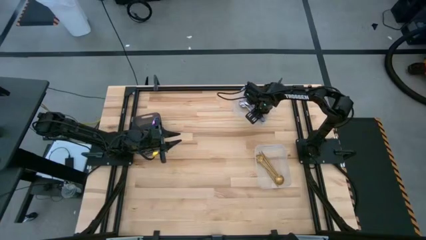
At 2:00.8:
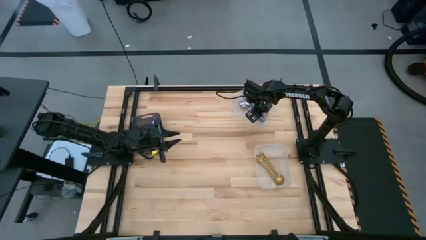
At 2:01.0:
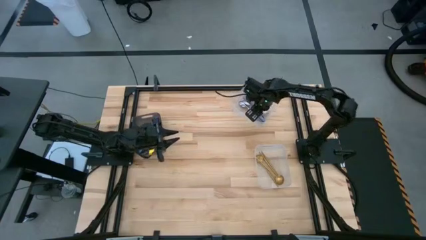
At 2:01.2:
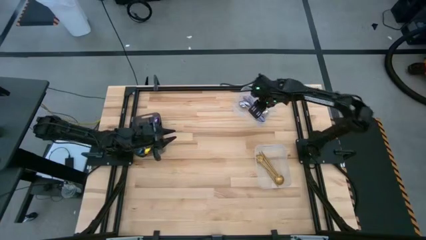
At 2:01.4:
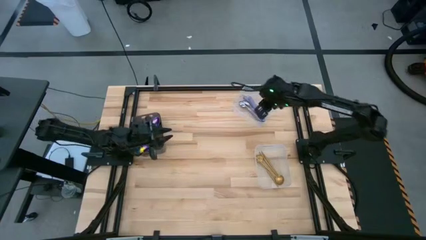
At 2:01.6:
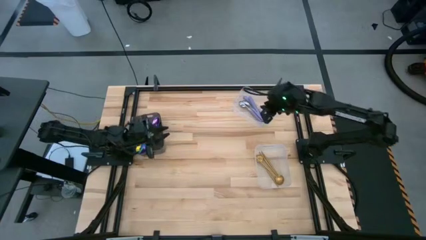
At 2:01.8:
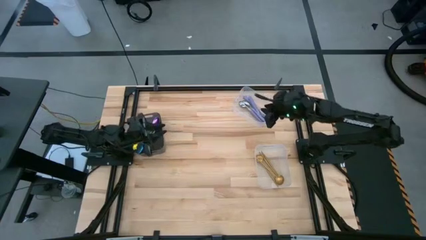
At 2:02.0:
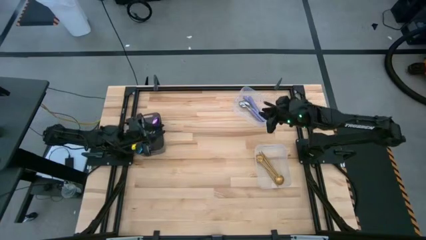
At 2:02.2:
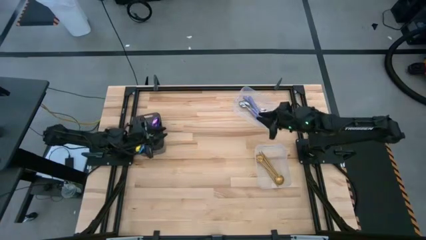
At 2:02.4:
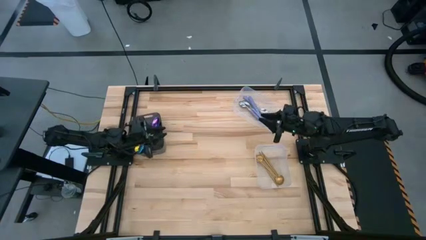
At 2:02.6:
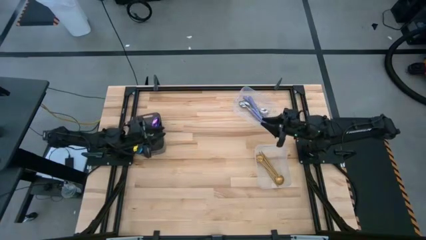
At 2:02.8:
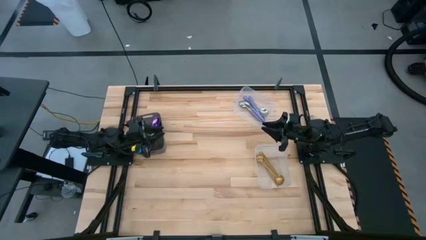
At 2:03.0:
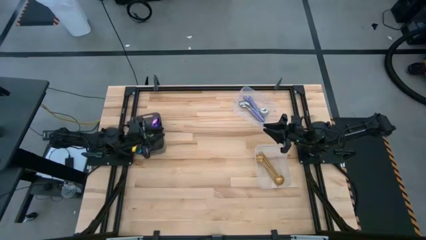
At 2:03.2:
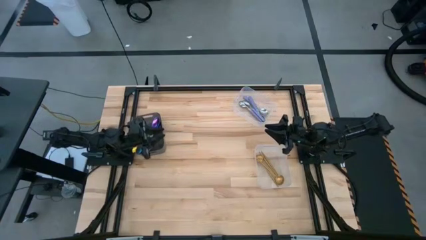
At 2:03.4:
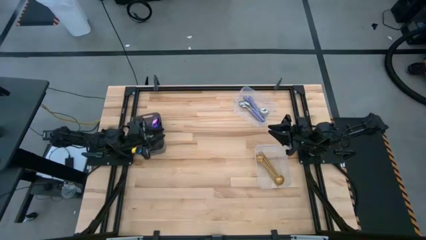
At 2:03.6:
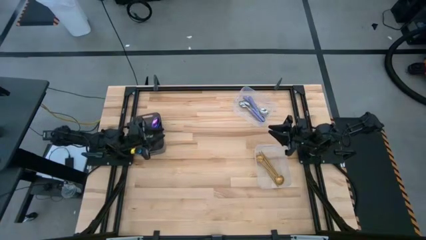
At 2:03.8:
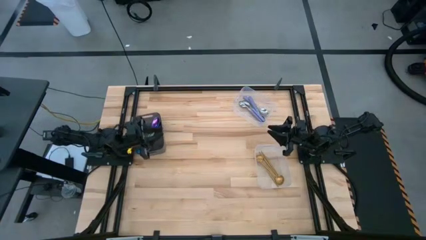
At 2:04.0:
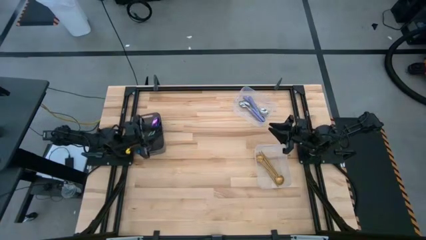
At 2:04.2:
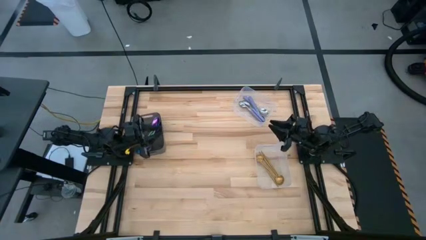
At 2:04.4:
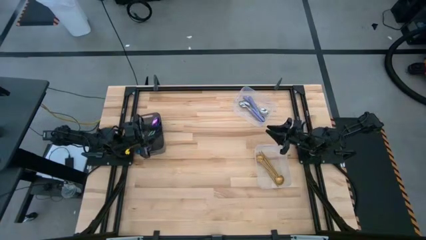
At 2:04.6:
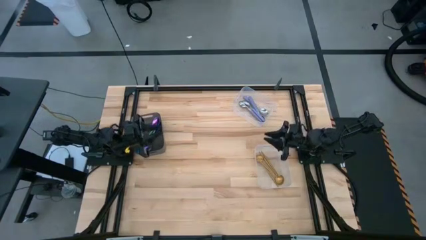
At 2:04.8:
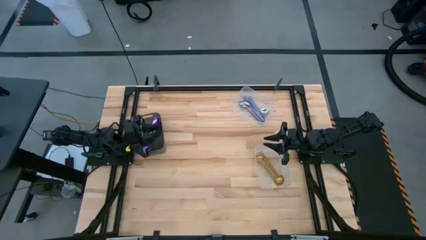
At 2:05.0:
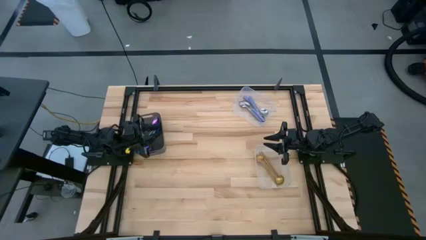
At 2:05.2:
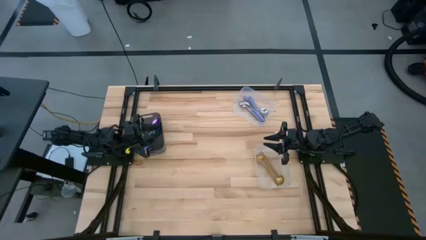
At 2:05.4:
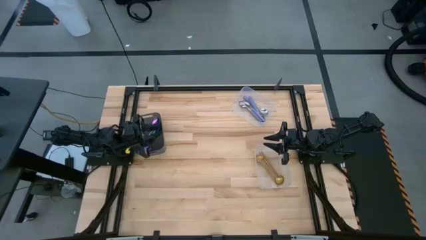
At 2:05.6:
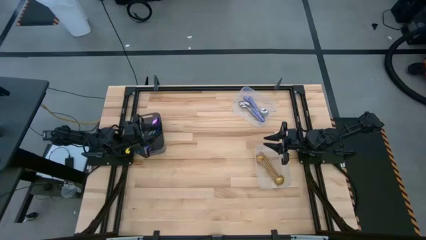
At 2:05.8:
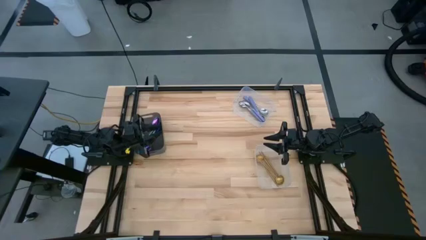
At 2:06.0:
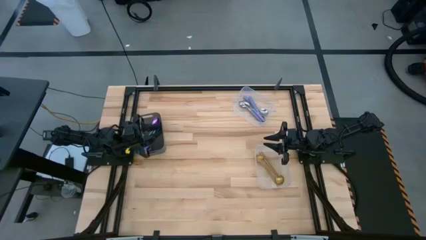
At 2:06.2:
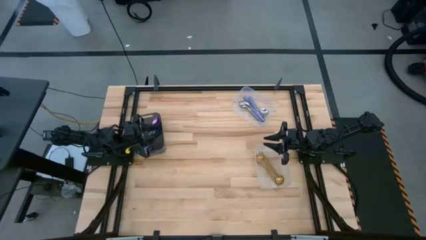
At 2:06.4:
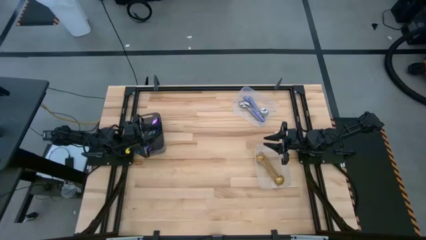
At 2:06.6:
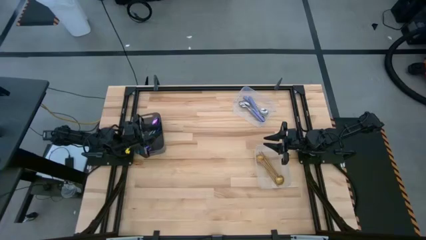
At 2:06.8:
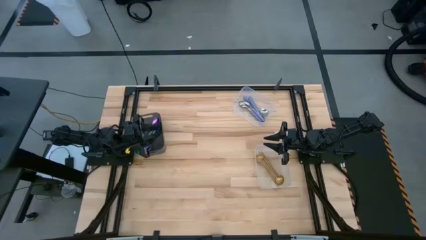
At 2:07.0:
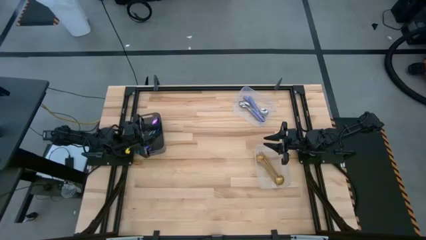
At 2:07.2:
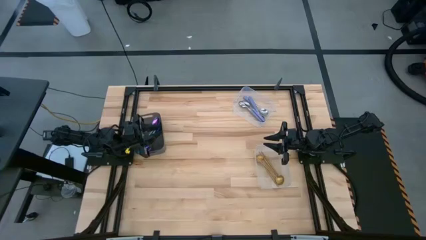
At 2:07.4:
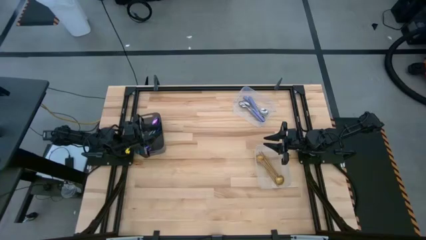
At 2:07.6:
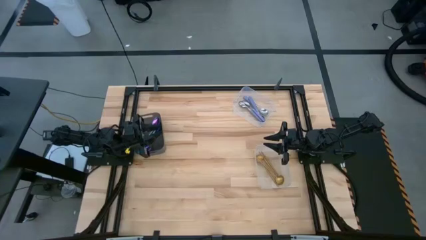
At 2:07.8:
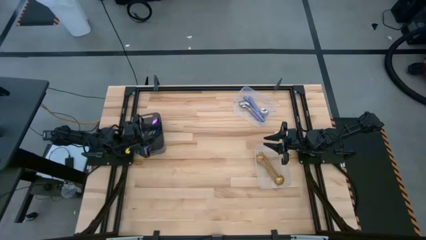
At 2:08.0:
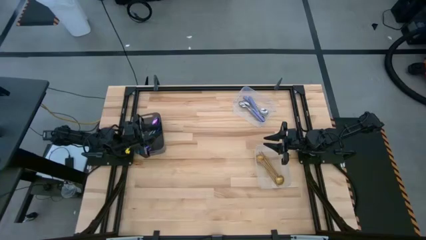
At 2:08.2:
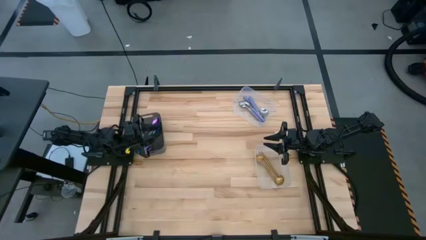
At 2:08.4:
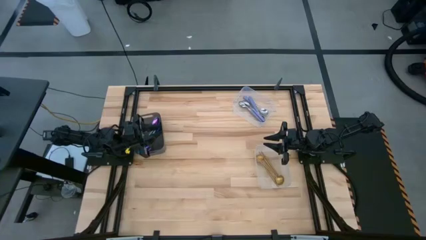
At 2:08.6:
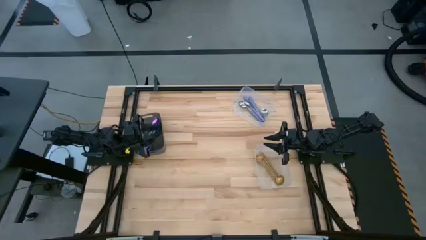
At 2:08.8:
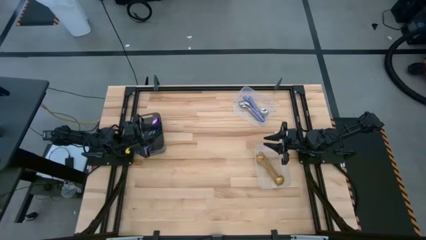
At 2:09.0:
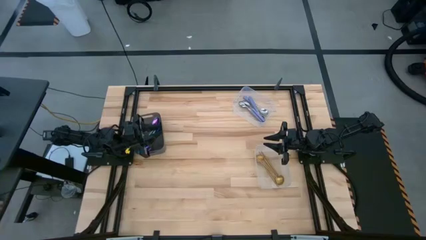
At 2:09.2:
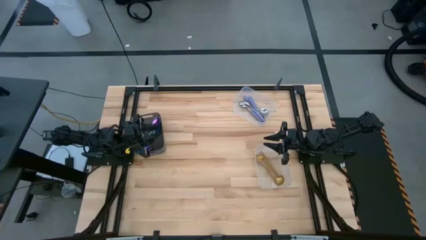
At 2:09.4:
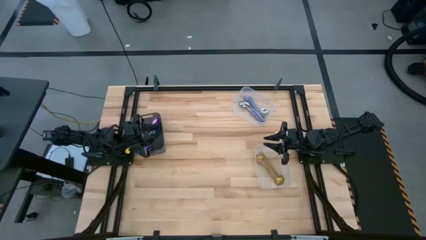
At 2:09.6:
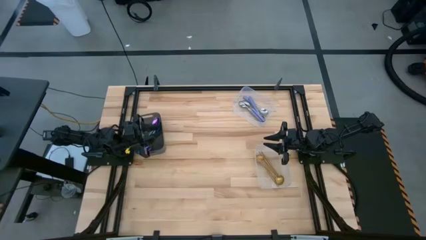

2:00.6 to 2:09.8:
Task: Sort silverware by color (type)
Return to Home Position
